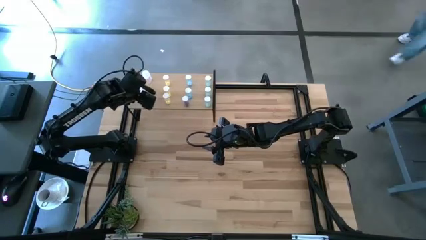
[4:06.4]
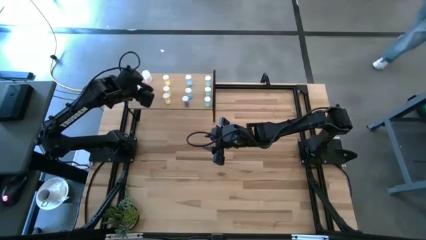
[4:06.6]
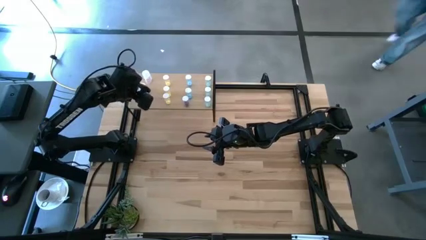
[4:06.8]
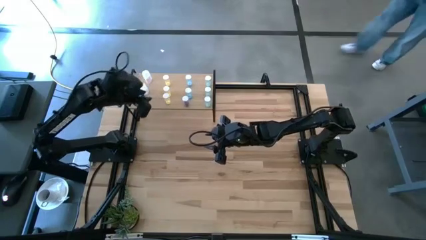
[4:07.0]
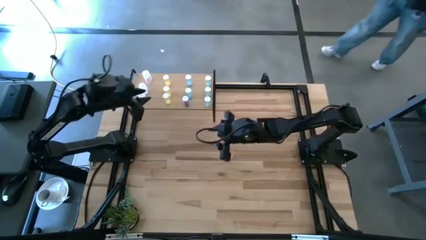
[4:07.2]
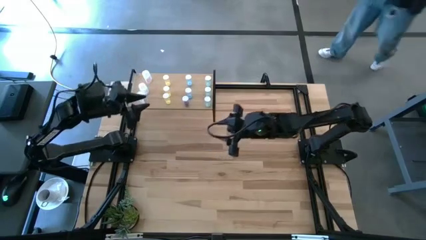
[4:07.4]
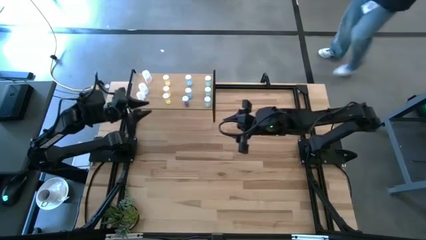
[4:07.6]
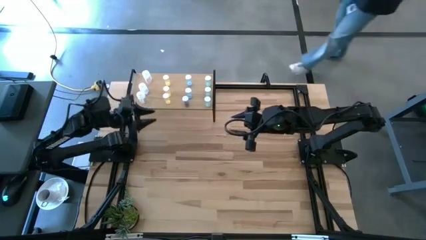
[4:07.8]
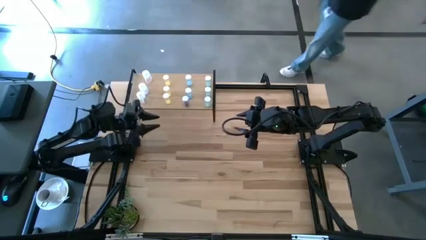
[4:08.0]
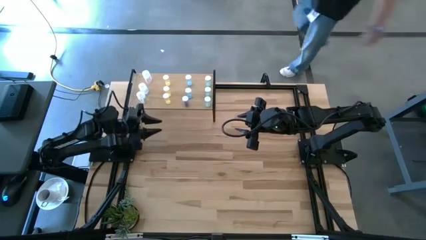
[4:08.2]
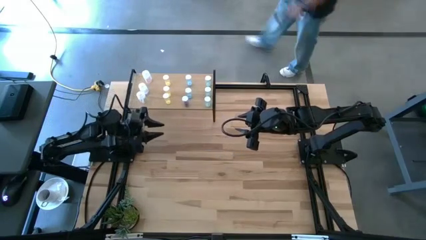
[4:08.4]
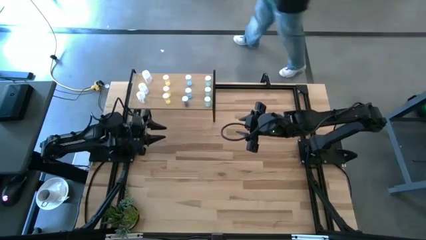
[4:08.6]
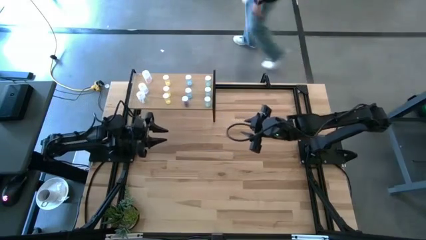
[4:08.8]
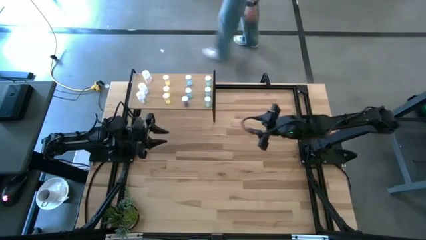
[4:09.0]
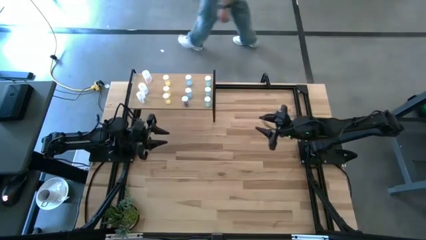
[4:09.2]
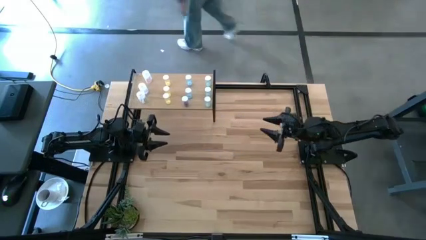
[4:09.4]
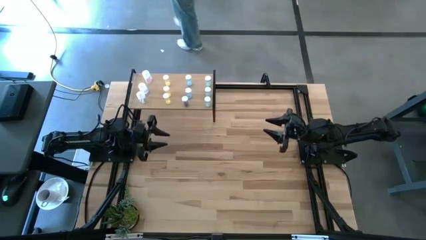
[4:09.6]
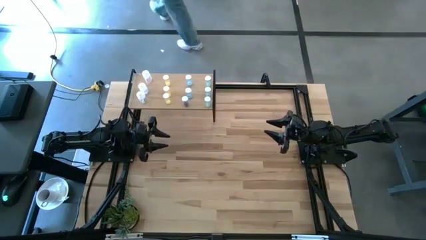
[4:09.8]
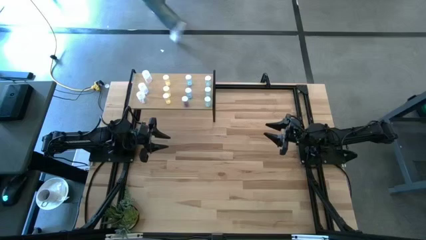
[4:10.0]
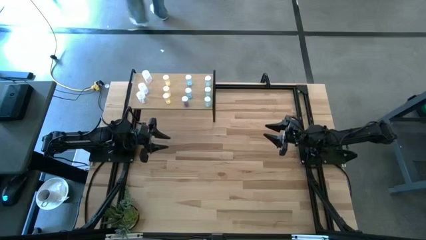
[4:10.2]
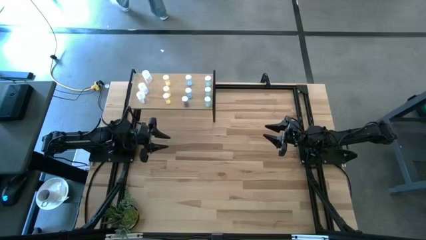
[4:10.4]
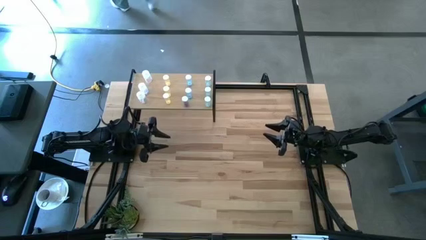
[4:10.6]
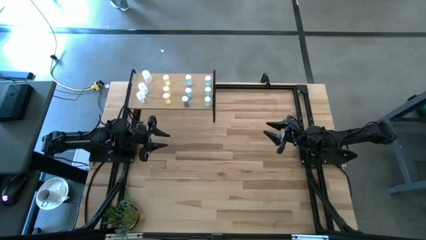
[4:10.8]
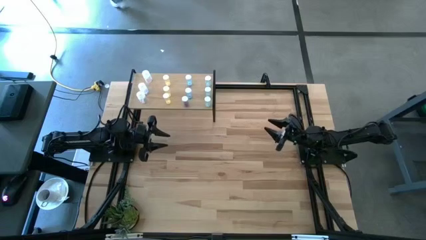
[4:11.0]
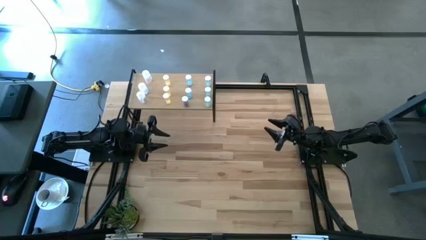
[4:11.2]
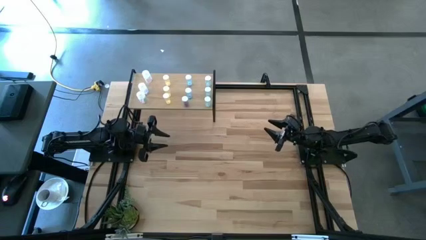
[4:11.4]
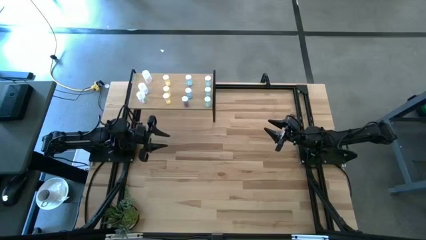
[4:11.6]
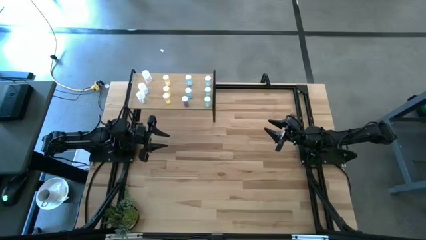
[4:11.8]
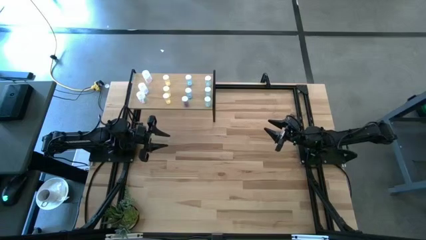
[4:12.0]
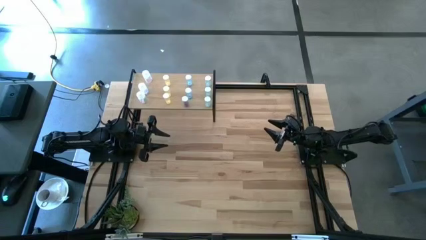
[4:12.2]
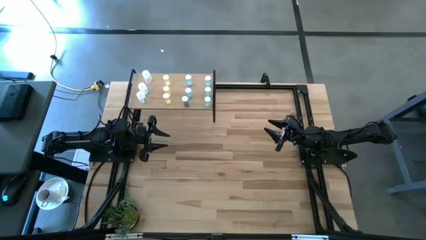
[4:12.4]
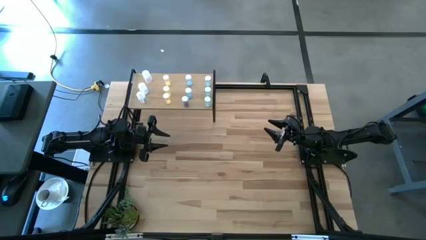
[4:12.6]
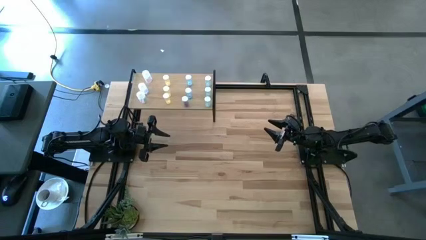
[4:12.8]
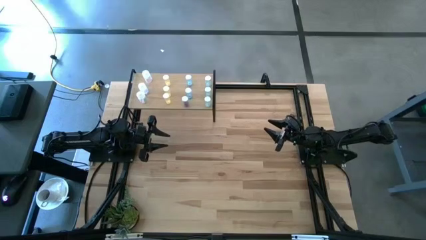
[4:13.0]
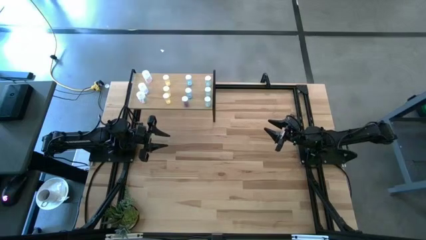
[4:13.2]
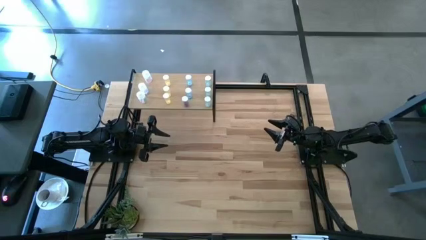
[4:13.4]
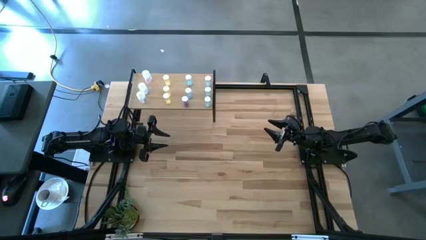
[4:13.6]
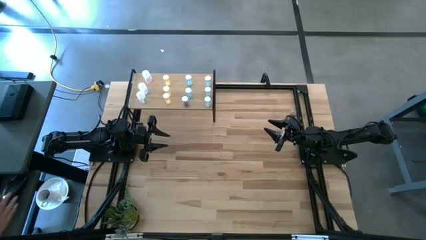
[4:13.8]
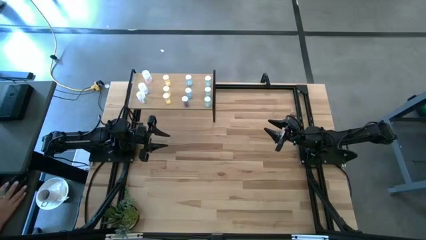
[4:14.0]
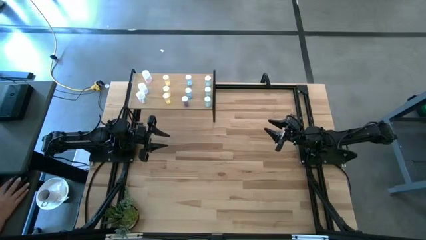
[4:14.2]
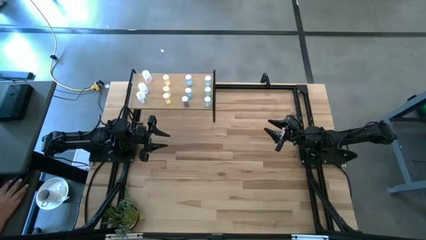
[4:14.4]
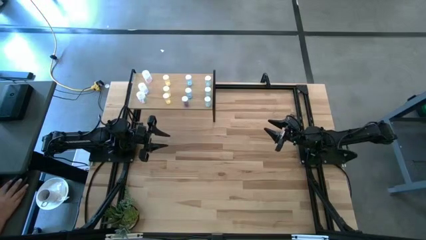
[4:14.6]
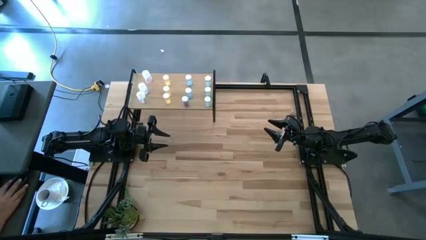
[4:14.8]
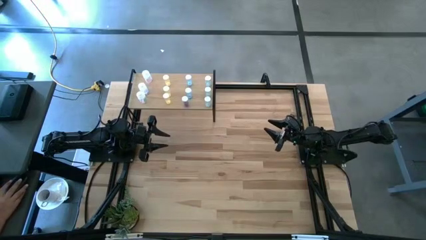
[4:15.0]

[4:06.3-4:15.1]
Task: Pick and place medicine bottles onto shelf by color
Return to Home Position

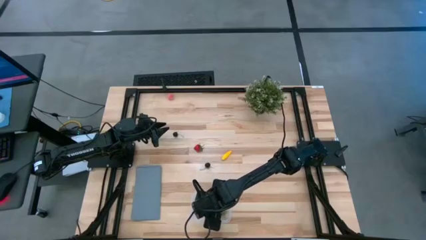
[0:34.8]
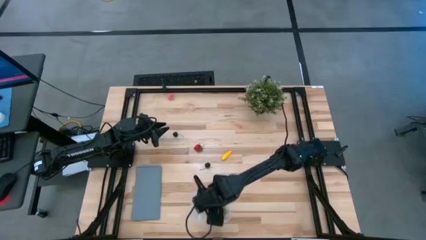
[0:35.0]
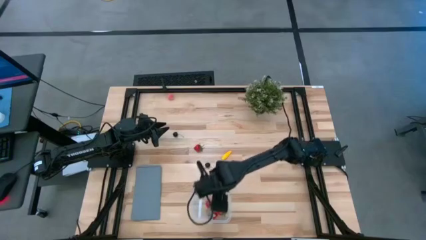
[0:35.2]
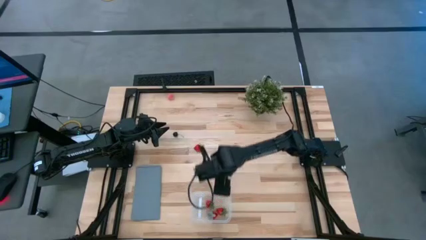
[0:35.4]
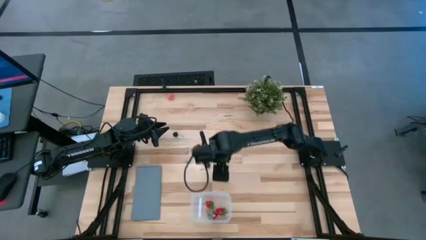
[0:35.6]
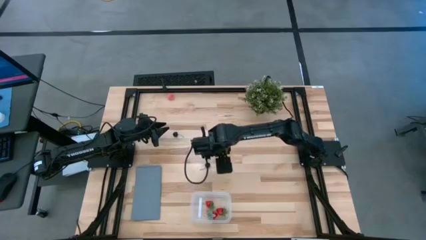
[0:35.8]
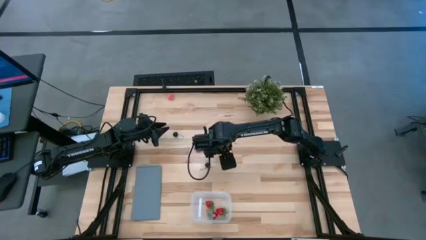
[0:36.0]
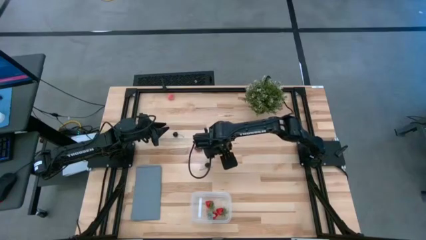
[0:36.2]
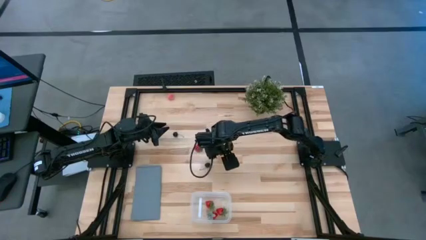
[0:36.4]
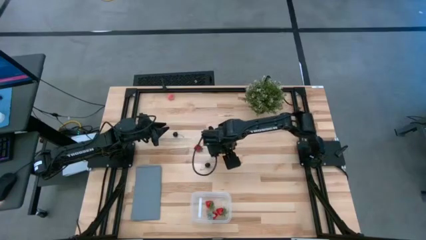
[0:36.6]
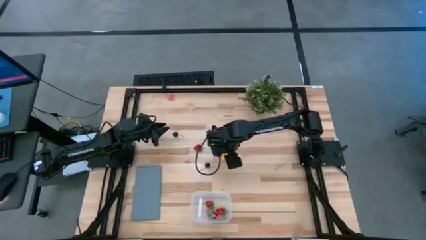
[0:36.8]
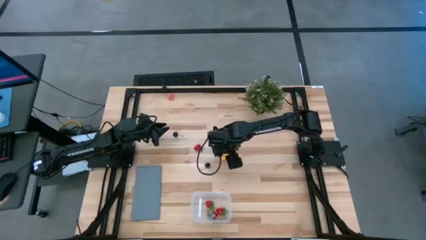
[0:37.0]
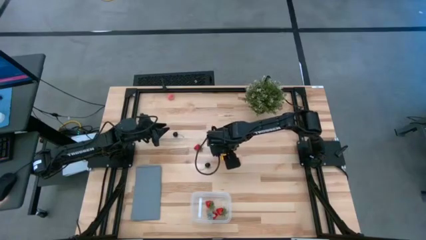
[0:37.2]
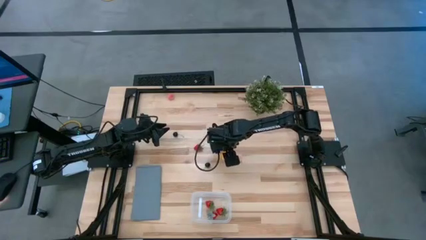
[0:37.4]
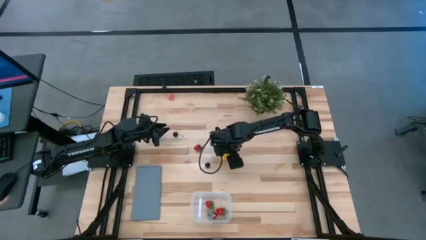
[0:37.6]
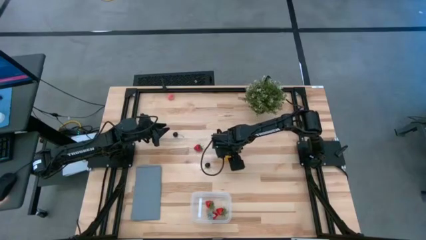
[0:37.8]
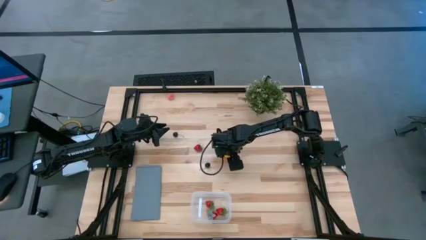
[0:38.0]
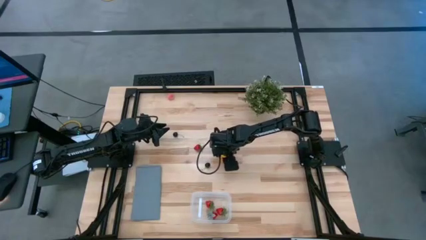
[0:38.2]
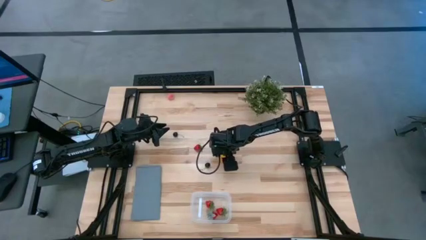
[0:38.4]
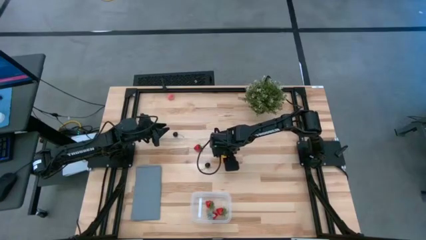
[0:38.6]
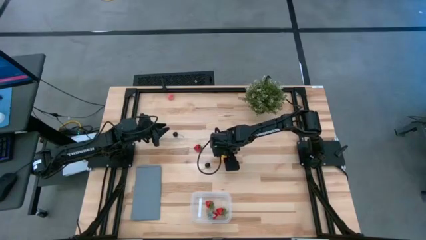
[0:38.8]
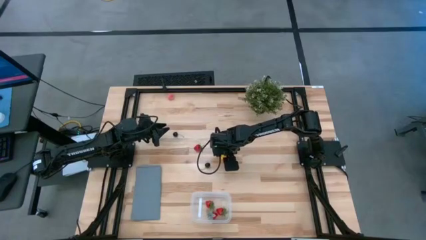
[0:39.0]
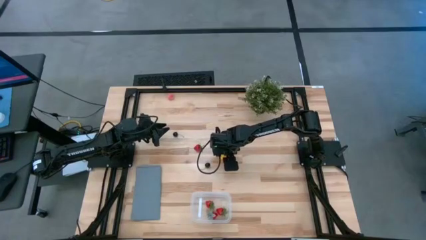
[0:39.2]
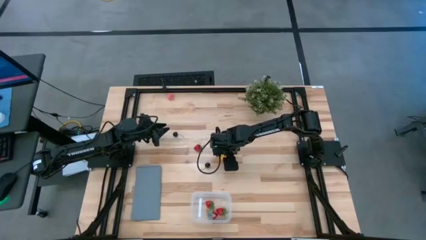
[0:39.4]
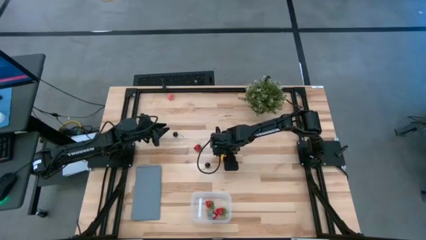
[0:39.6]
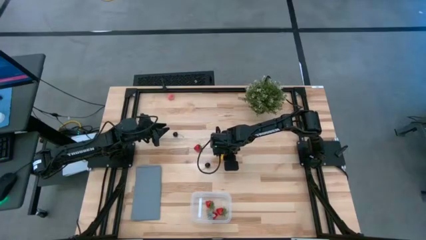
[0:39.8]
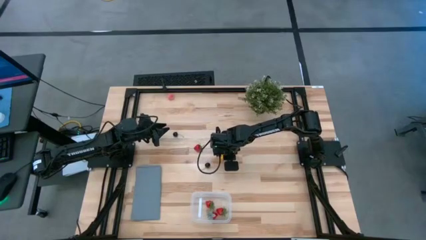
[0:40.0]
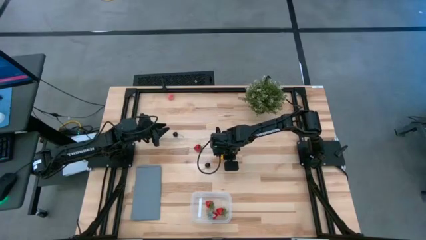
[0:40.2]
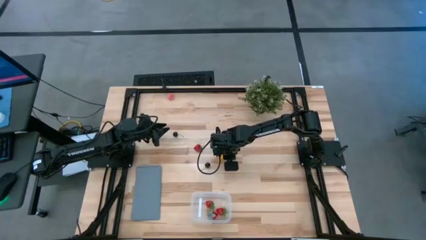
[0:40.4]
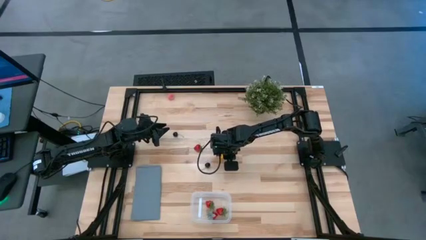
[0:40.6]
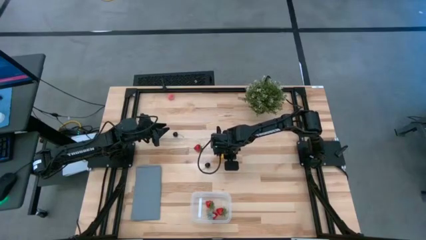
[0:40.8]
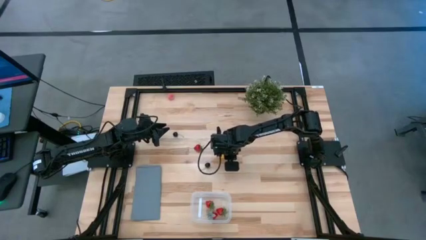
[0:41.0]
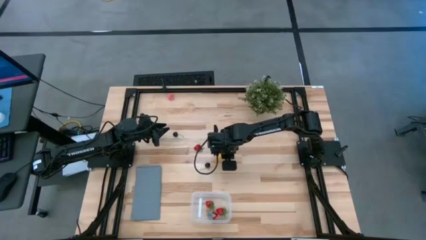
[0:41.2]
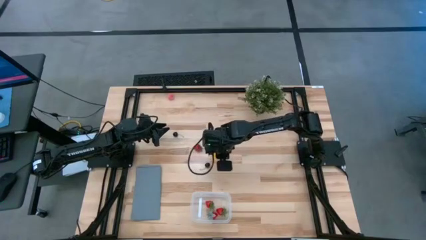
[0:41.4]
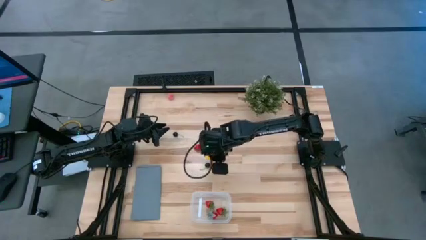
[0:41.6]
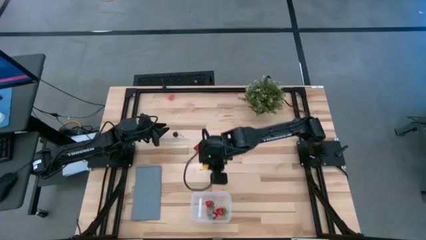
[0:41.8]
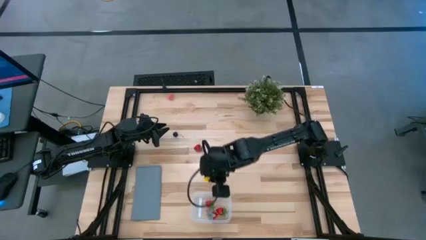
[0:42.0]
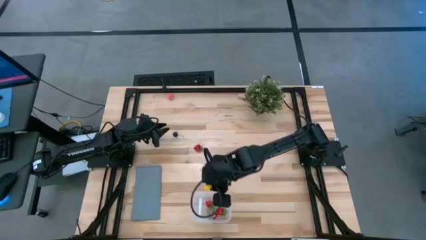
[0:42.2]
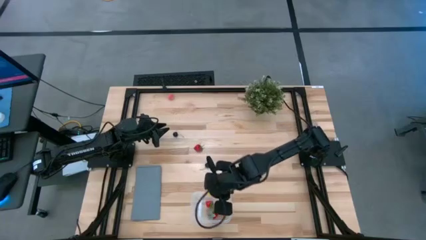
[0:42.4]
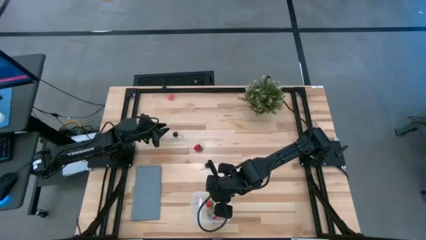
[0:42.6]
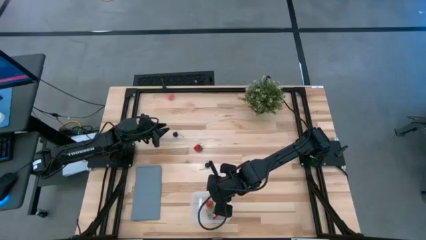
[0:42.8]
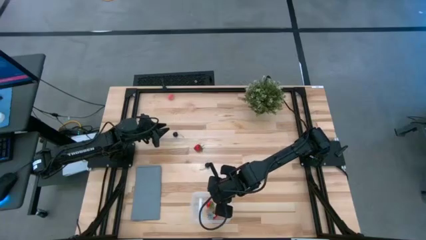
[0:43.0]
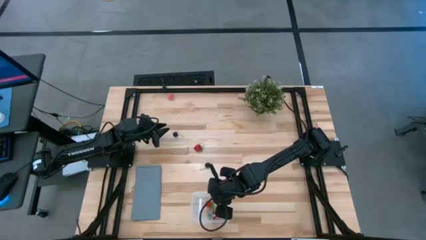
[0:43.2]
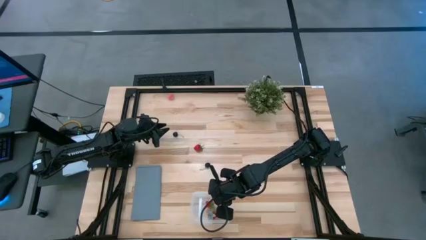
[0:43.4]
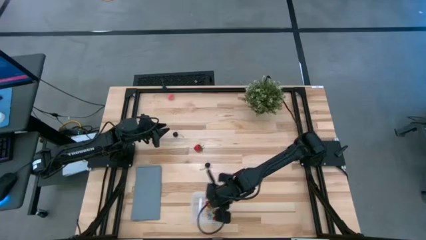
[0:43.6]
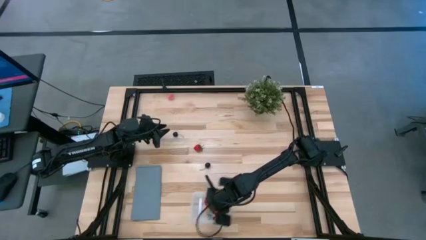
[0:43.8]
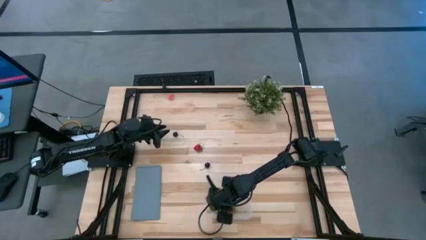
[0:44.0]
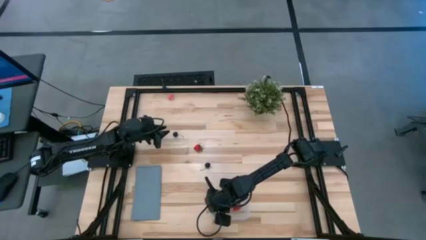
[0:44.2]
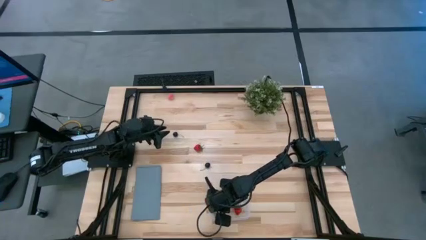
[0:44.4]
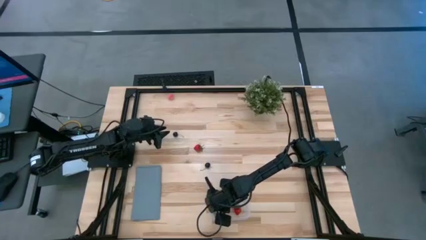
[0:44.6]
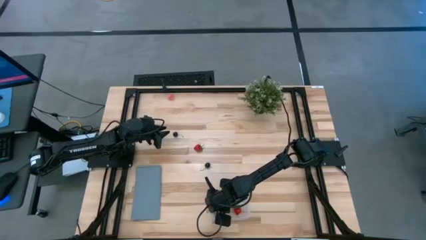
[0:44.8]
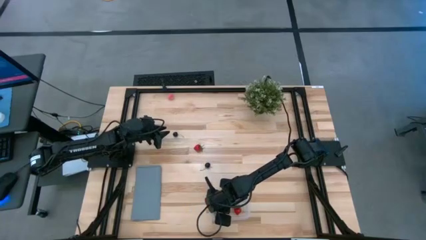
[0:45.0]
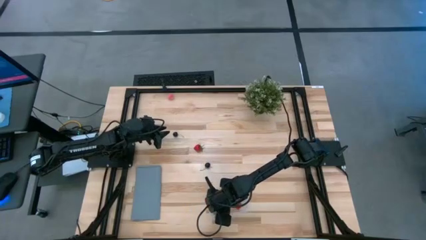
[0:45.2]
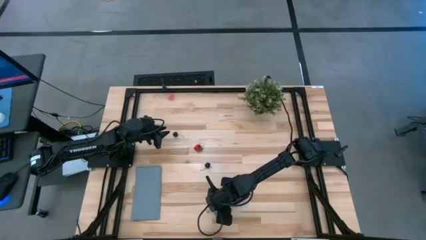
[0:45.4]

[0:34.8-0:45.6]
Task: Pick and placing Produce into tupperware
Put the yellow corn into the transparent bin
